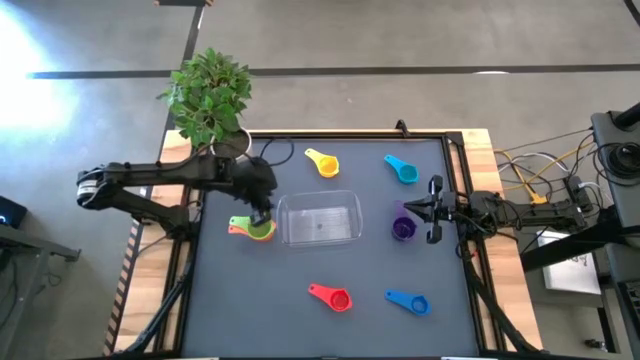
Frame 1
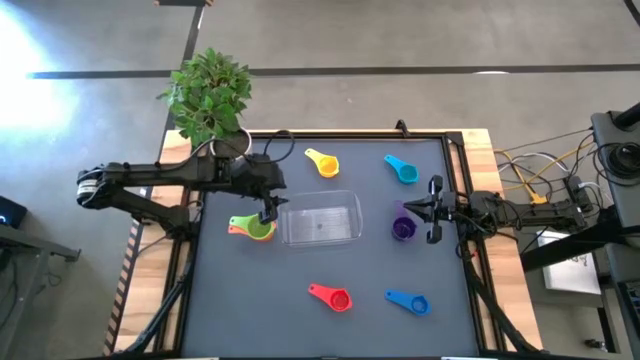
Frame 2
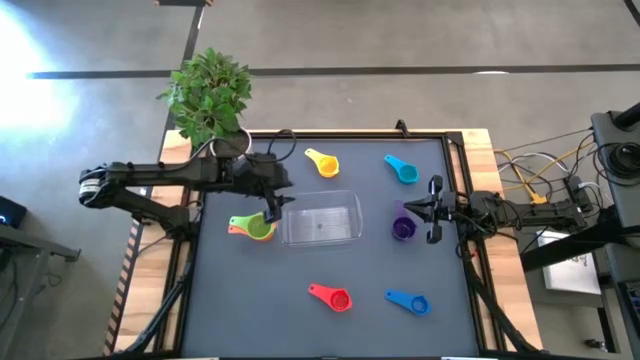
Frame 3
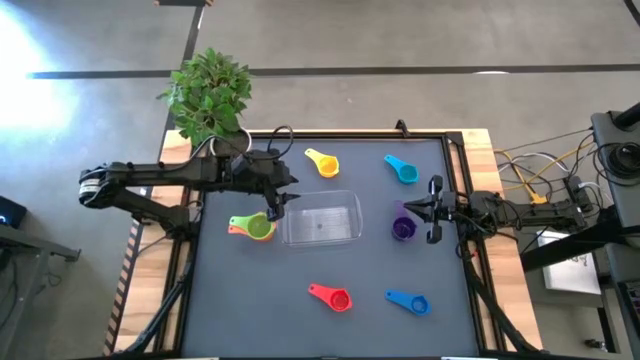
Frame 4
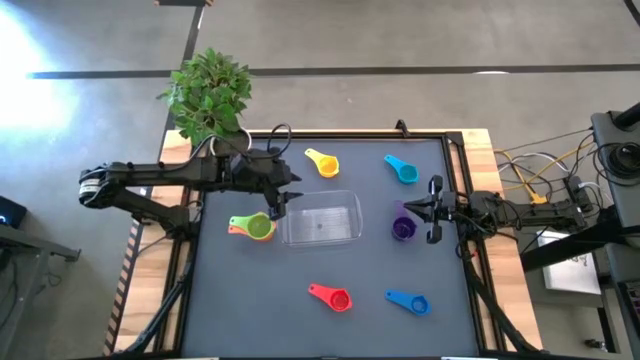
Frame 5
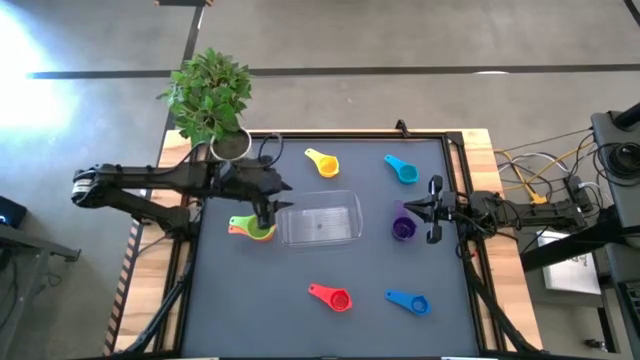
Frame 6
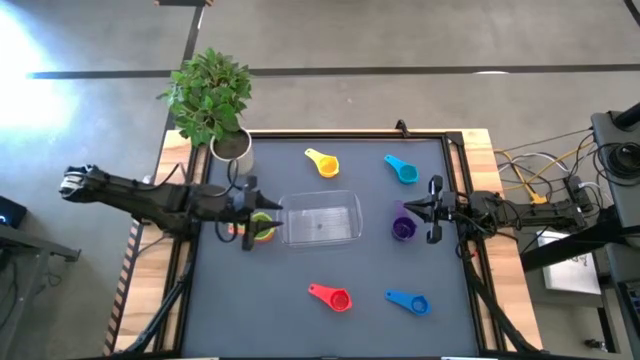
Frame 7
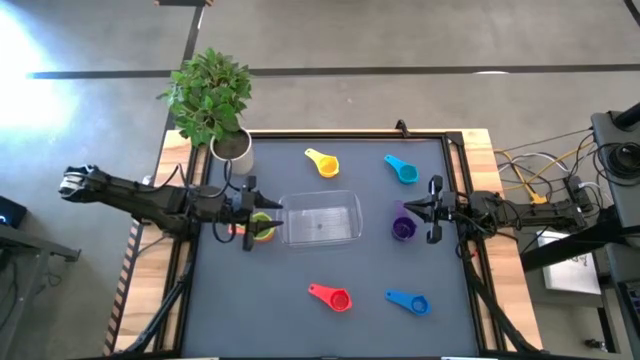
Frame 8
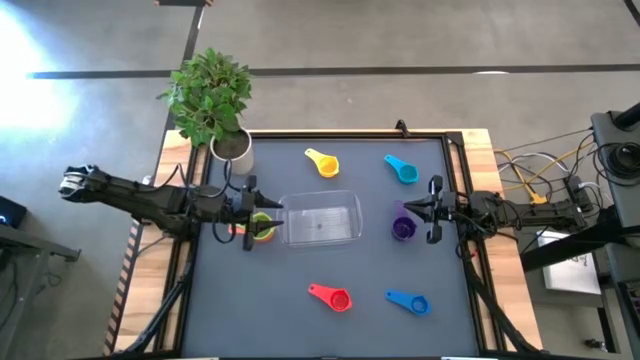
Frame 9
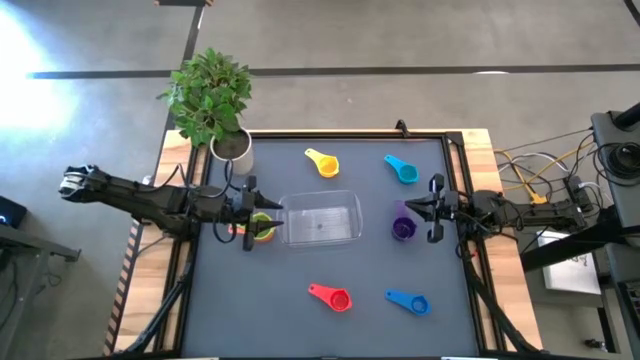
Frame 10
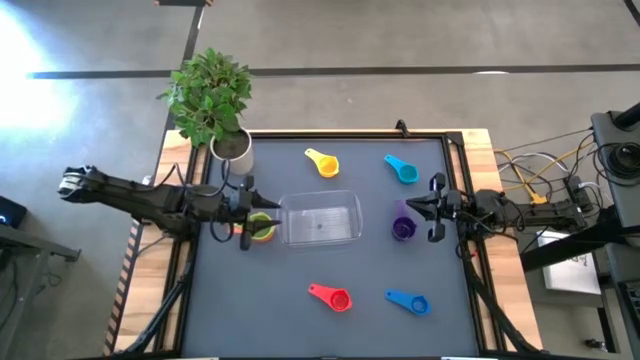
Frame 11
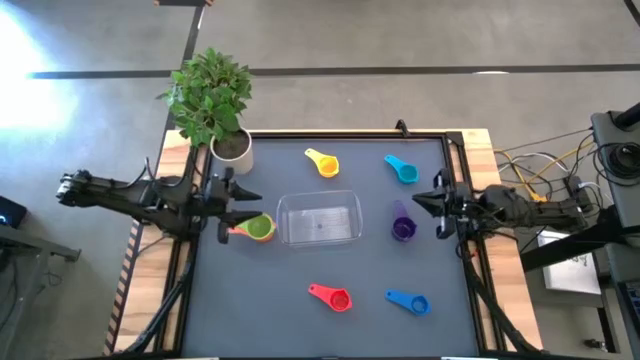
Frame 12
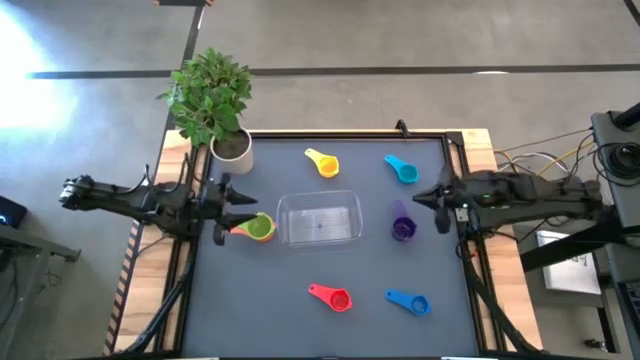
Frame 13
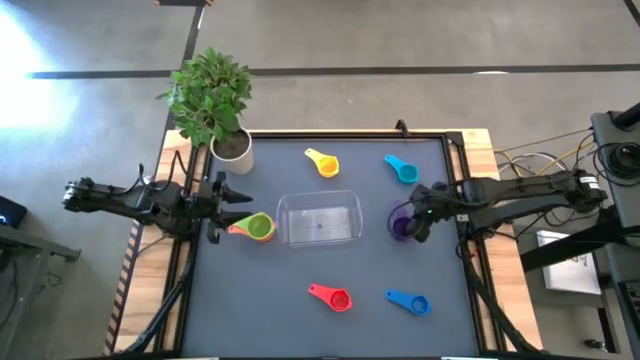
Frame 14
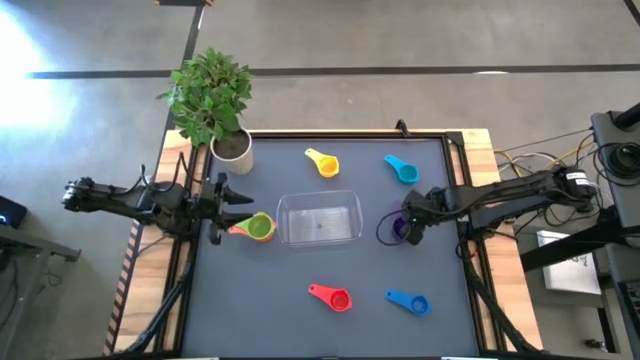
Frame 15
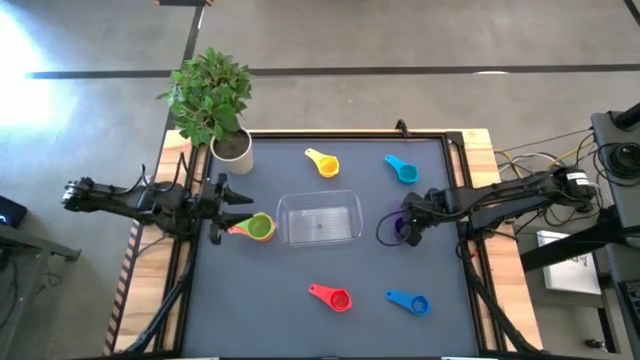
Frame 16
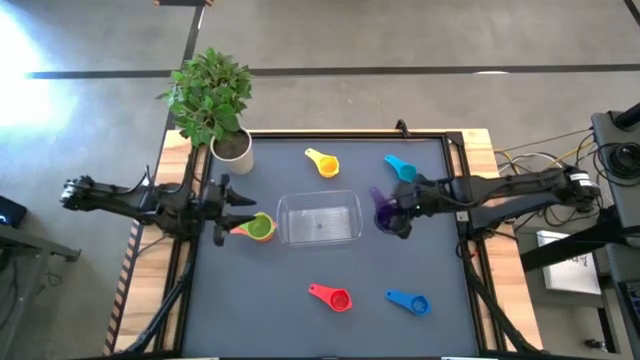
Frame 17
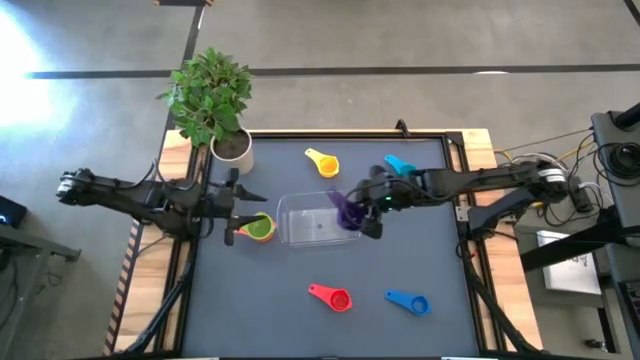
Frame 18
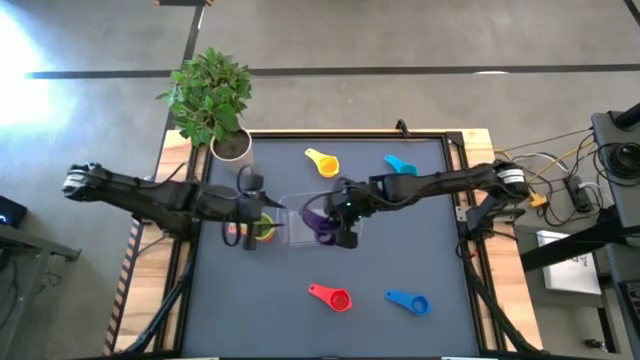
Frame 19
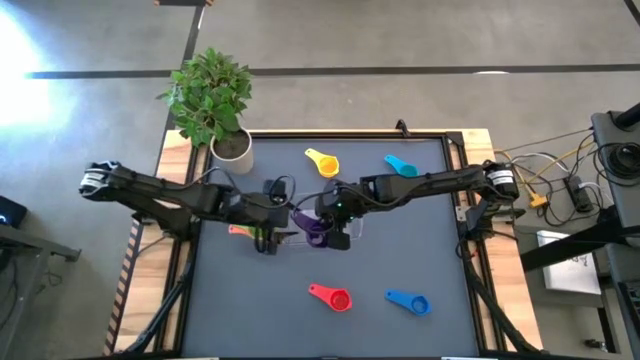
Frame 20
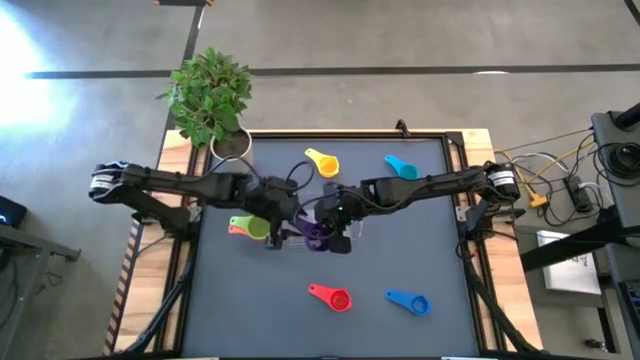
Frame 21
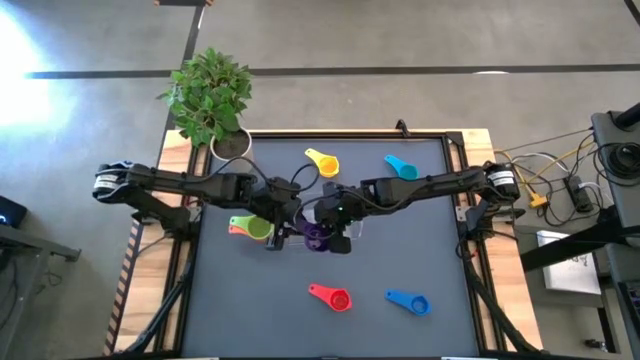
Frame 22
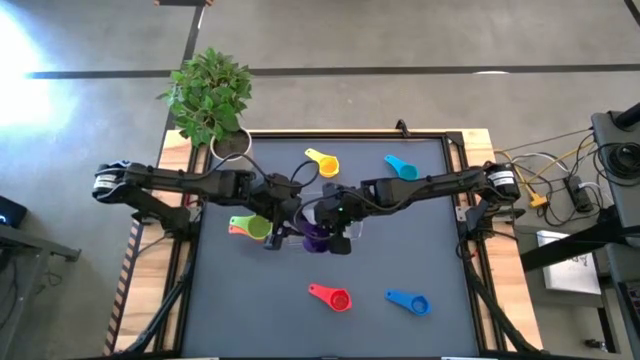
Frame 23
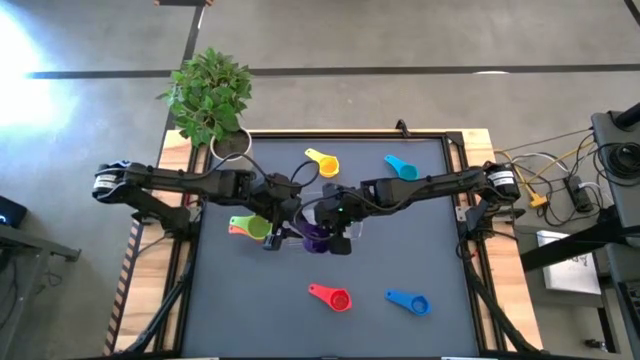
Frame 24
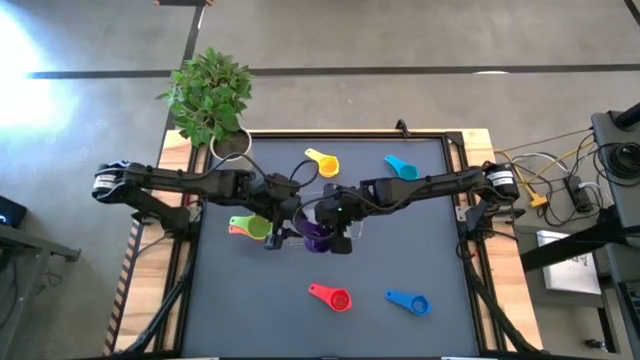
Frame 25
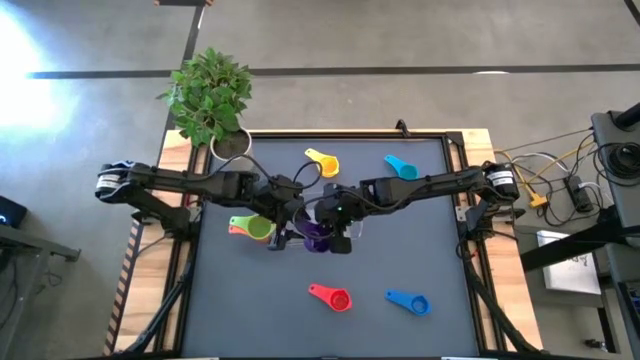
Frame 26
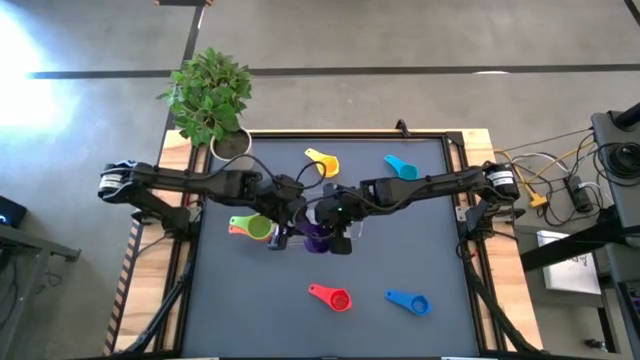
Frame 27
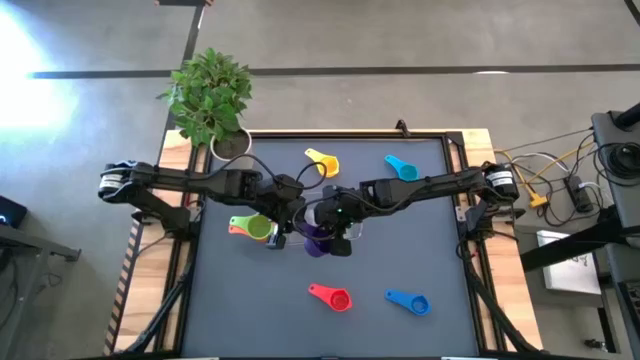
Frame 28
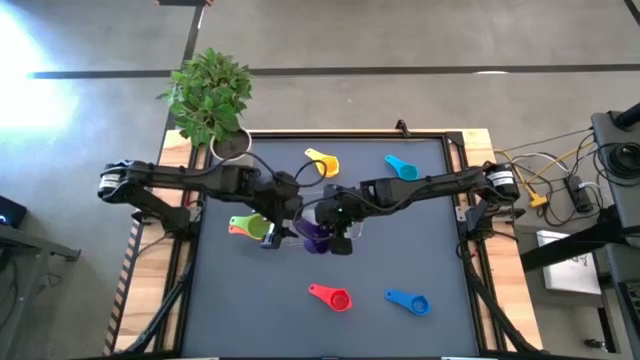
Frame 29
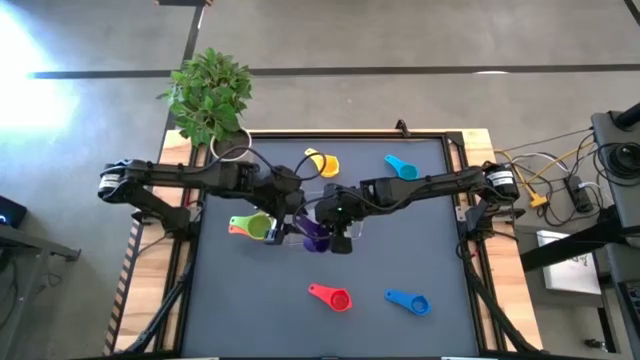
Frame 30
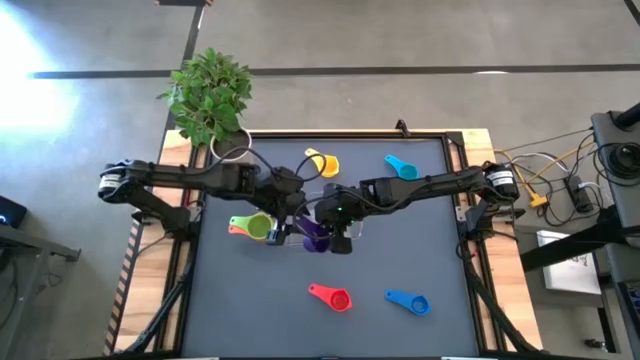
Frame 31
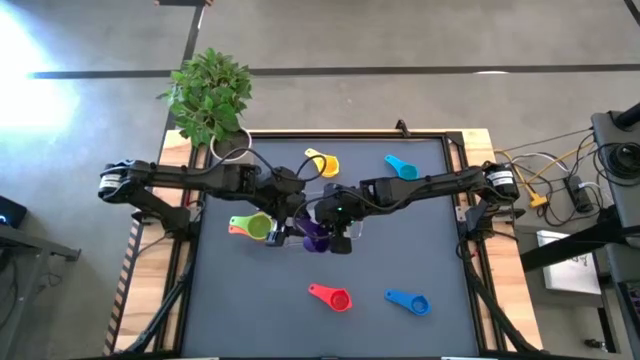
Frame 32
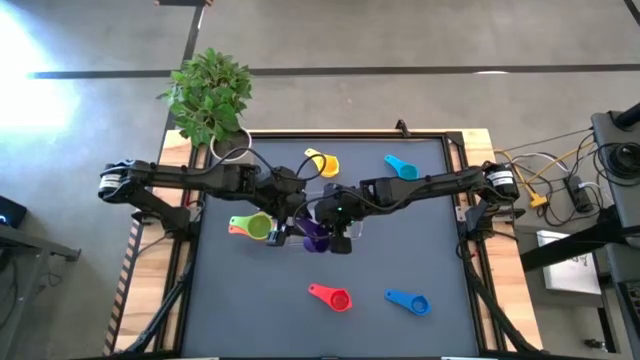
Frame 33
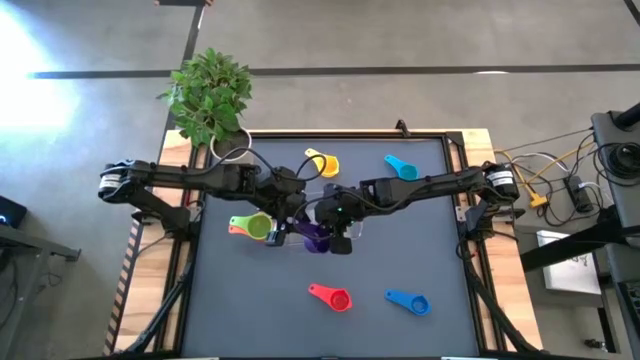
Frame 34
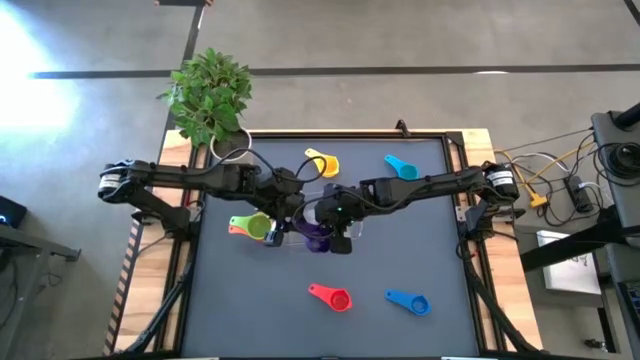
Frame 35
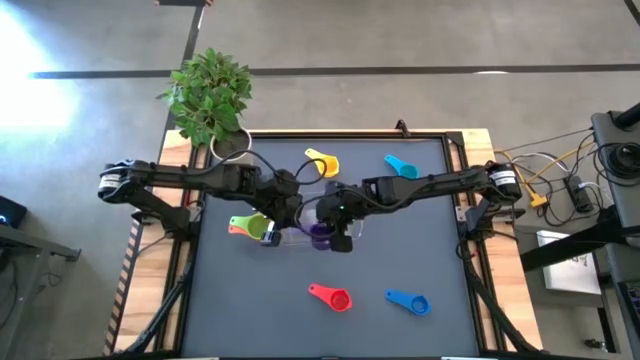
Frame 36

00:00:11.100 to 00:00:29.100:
Task: Nest measuring cups in basket
Stack the violet measuring cup on top of the green measuring cup

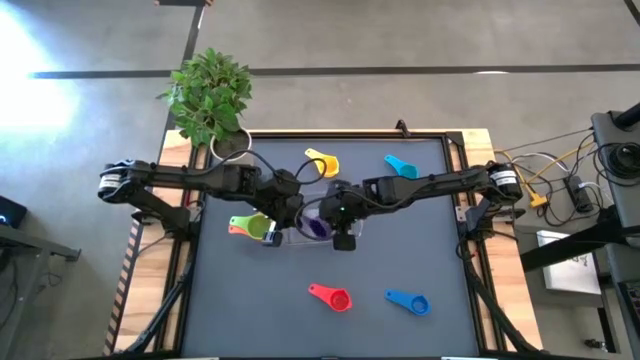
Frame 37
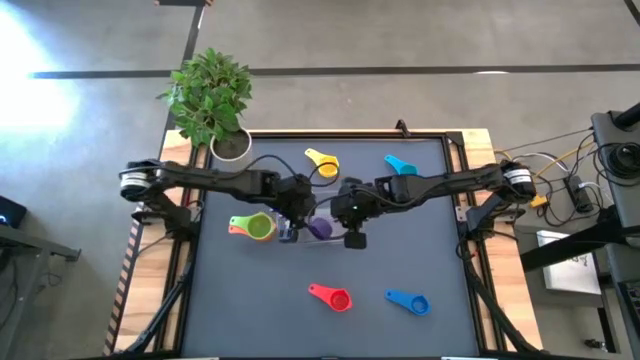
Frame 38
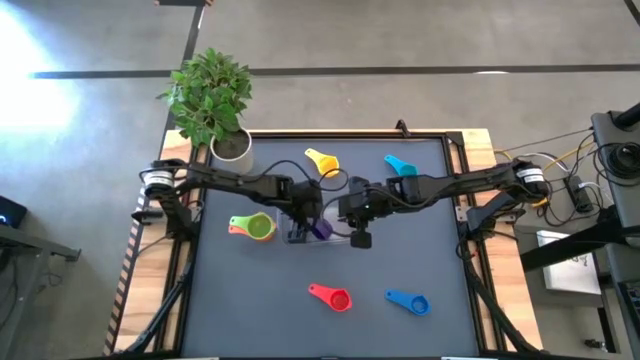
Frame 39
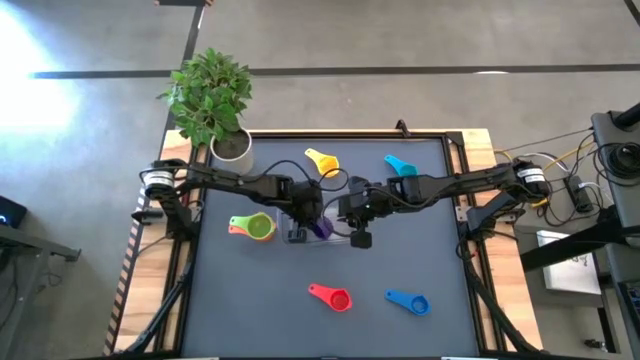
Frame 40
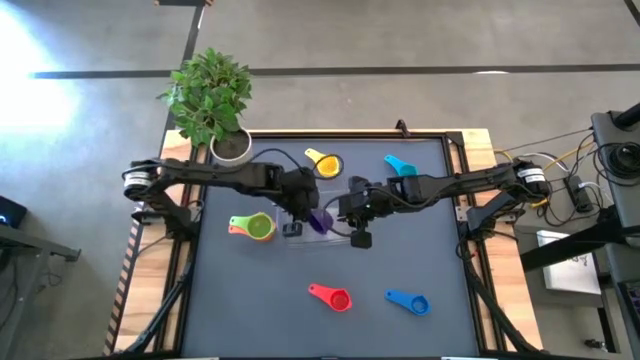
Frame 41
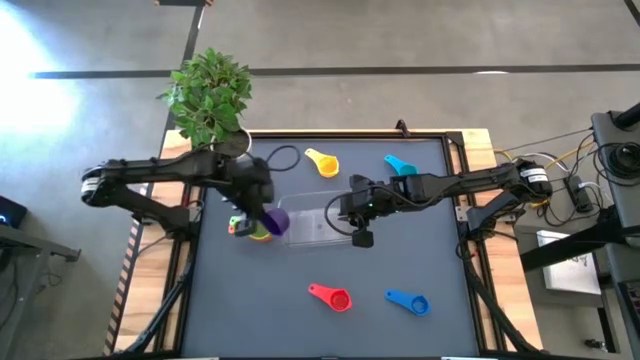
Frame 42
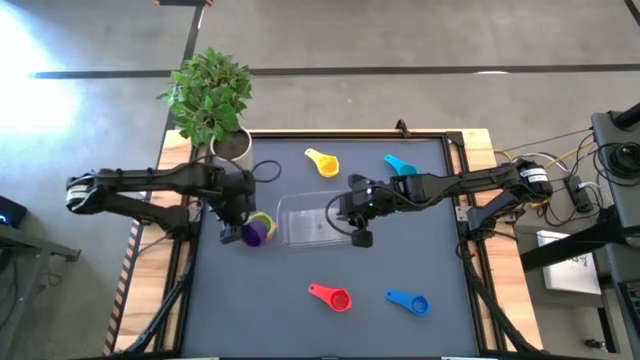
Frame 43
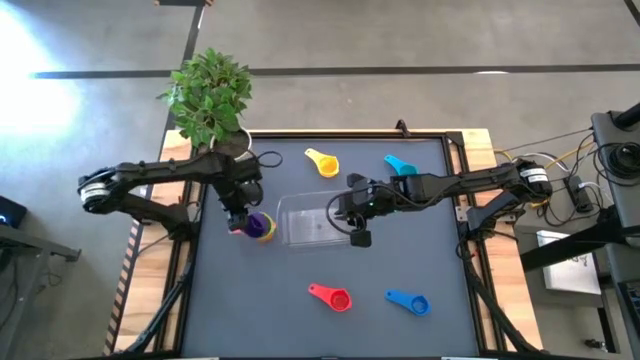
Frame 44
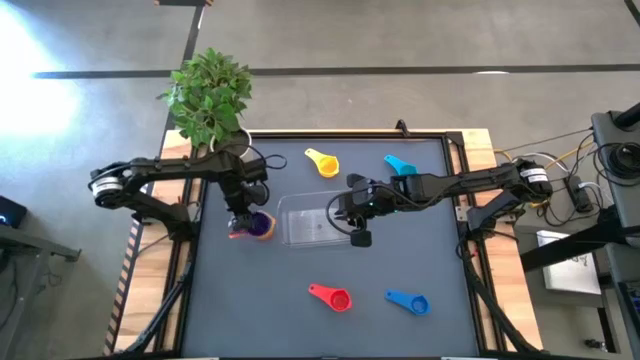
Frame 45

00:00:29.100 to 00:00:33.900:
Stack the violet measuring cup on top of the green measuring cup
